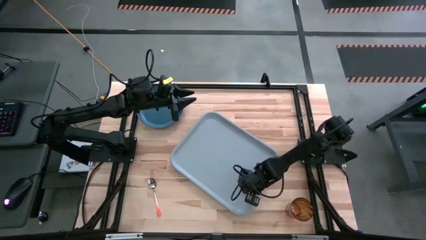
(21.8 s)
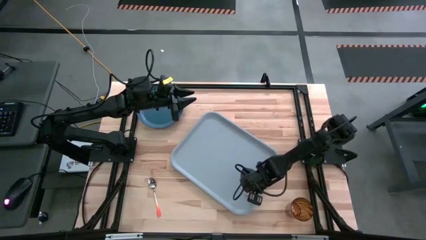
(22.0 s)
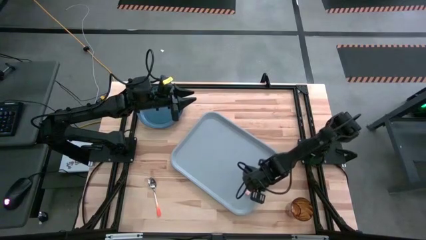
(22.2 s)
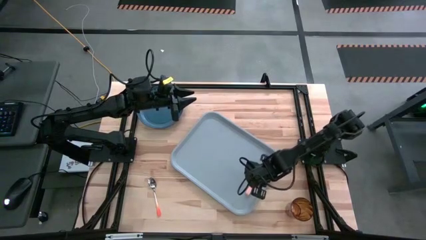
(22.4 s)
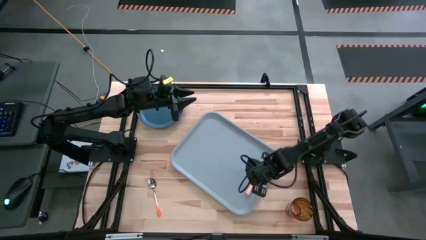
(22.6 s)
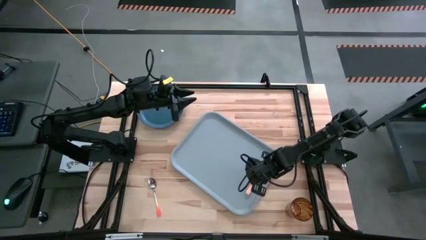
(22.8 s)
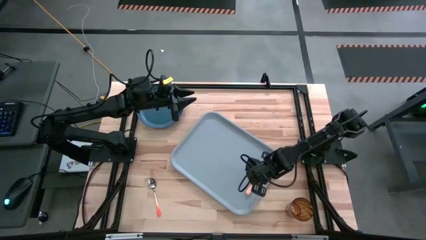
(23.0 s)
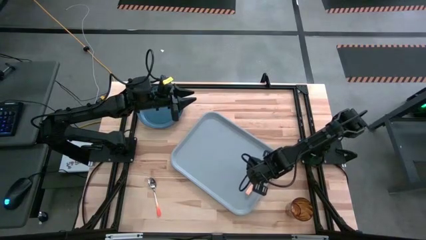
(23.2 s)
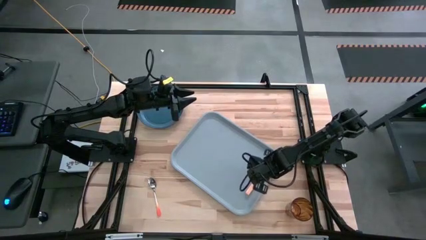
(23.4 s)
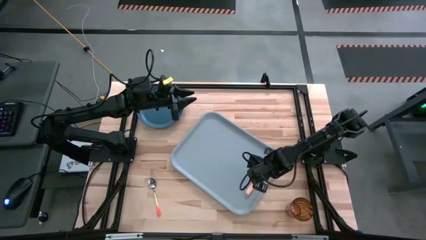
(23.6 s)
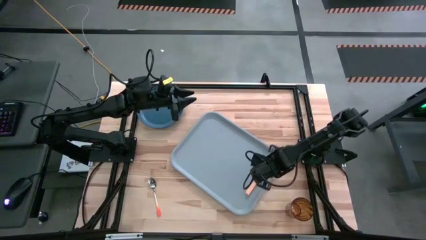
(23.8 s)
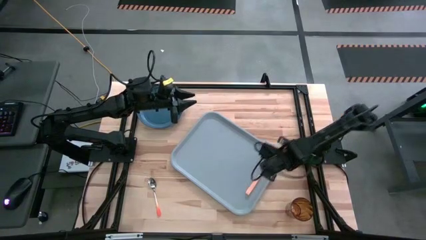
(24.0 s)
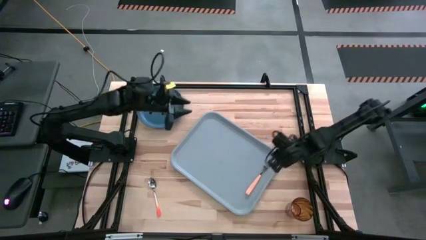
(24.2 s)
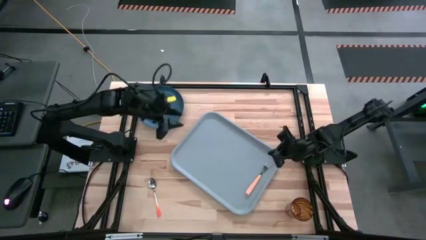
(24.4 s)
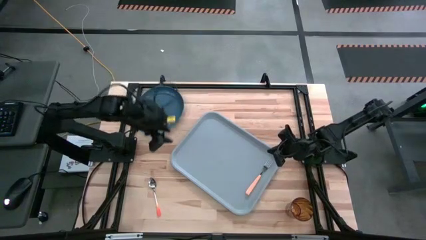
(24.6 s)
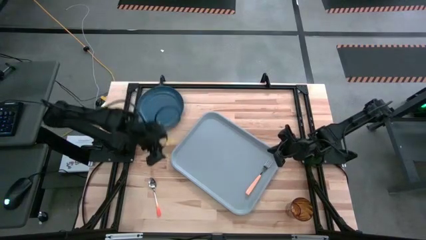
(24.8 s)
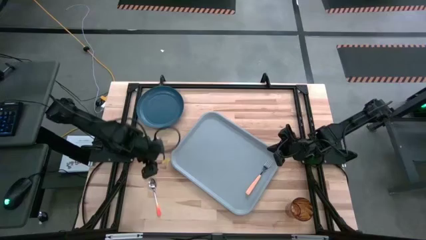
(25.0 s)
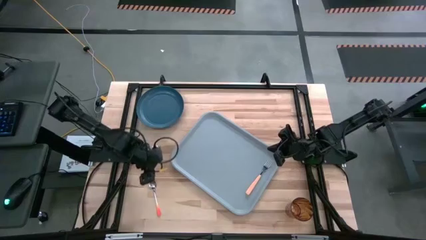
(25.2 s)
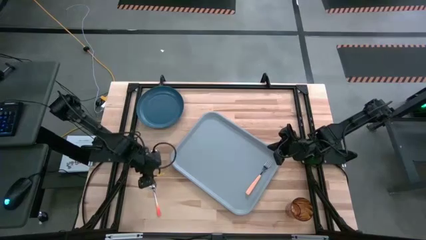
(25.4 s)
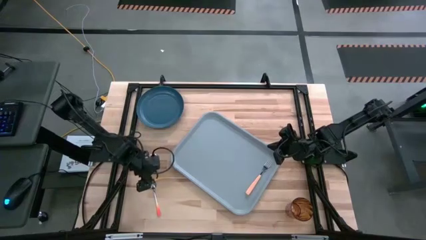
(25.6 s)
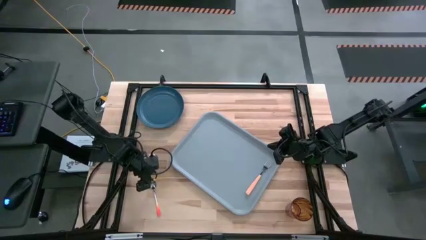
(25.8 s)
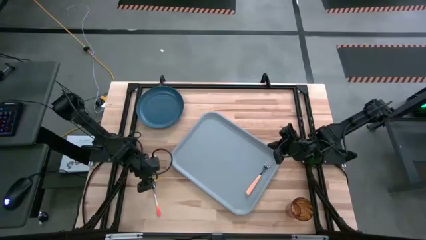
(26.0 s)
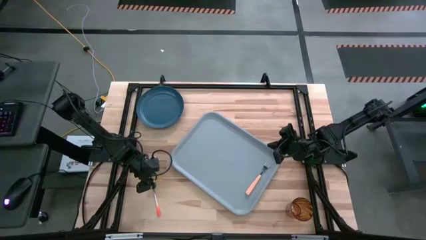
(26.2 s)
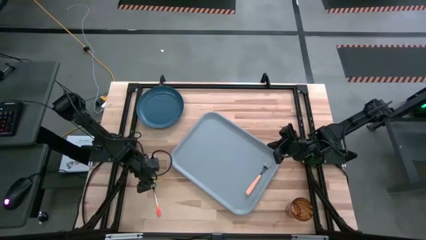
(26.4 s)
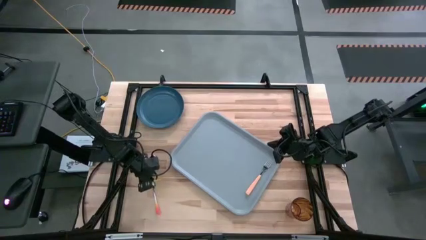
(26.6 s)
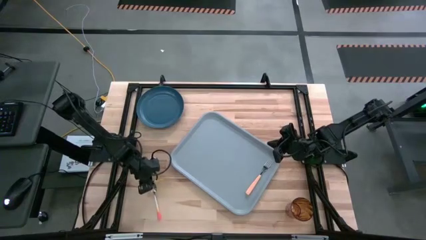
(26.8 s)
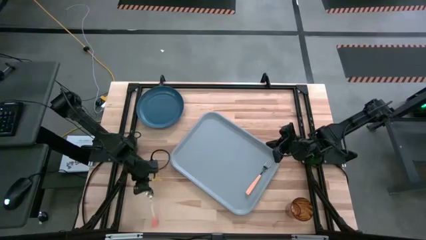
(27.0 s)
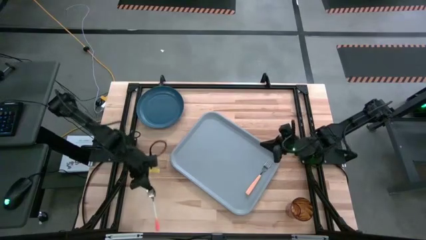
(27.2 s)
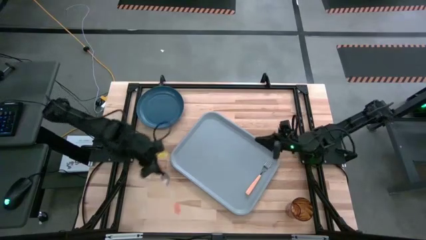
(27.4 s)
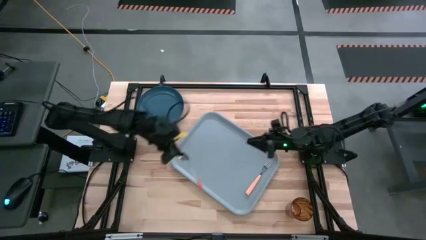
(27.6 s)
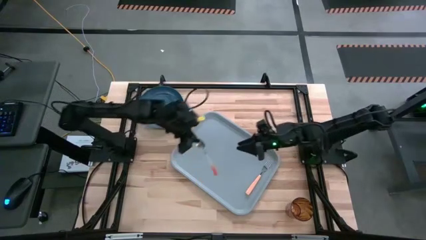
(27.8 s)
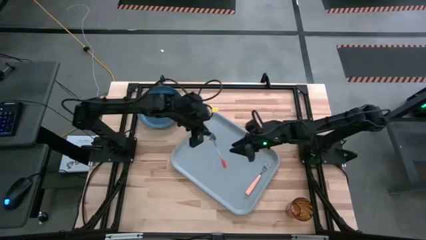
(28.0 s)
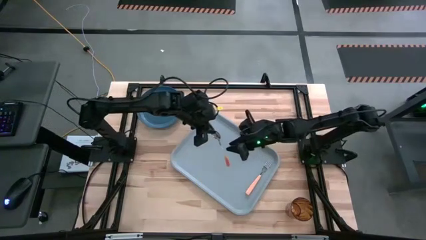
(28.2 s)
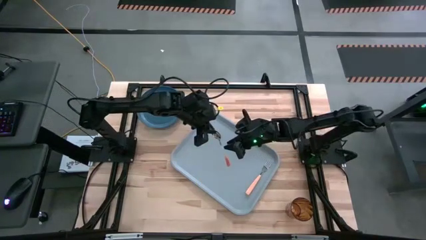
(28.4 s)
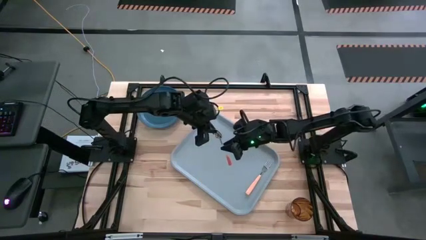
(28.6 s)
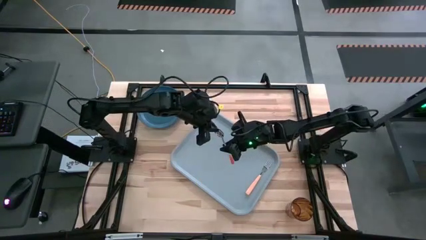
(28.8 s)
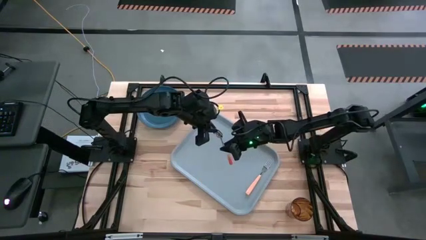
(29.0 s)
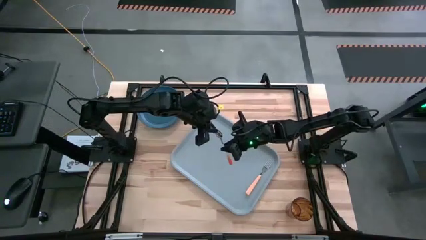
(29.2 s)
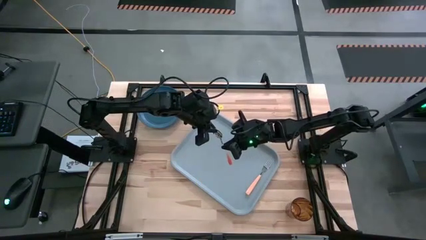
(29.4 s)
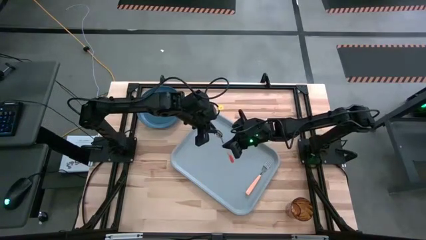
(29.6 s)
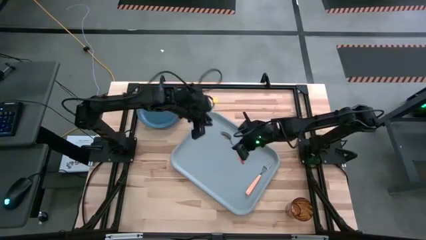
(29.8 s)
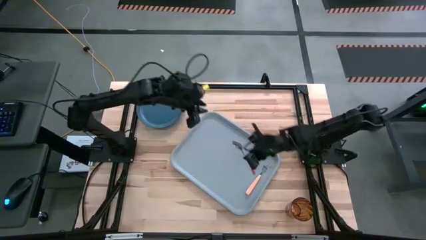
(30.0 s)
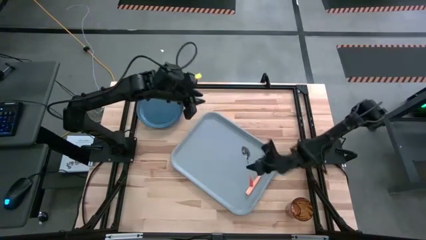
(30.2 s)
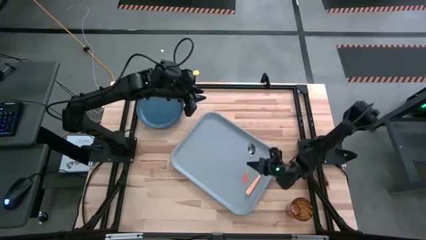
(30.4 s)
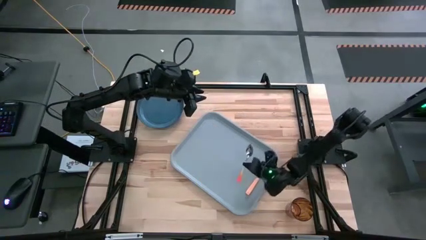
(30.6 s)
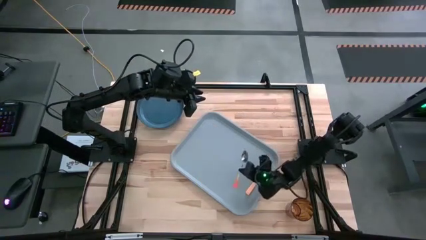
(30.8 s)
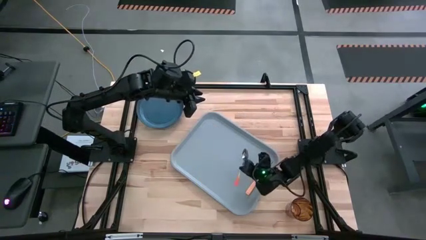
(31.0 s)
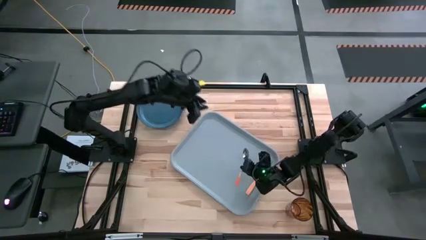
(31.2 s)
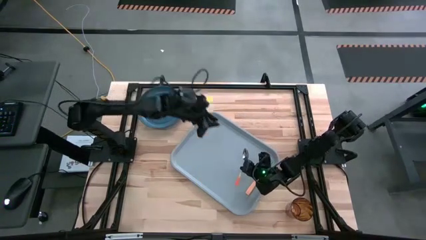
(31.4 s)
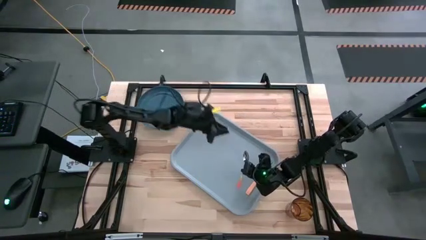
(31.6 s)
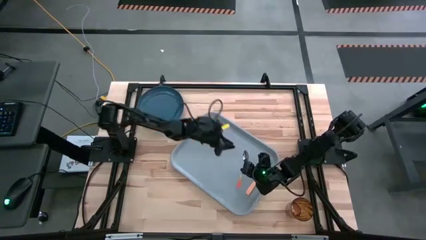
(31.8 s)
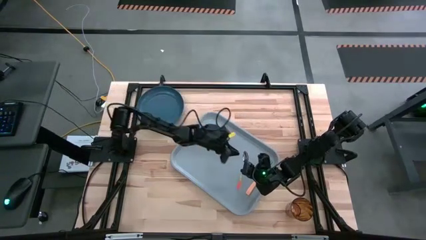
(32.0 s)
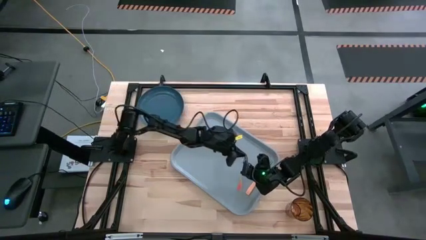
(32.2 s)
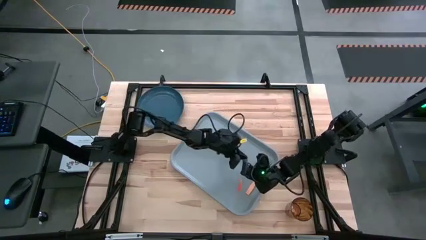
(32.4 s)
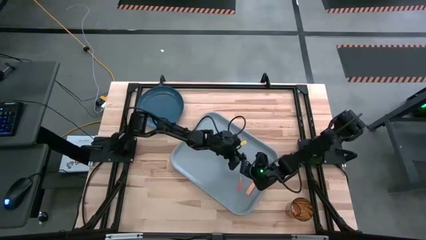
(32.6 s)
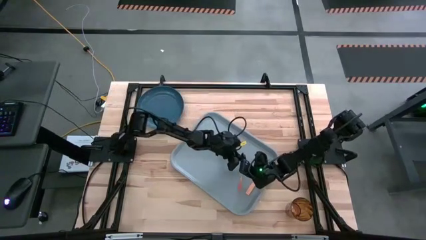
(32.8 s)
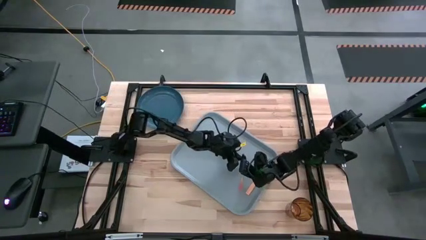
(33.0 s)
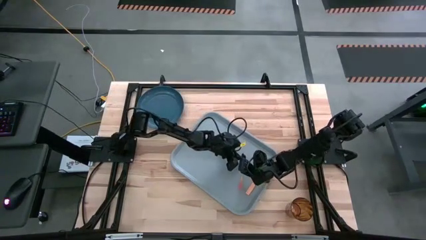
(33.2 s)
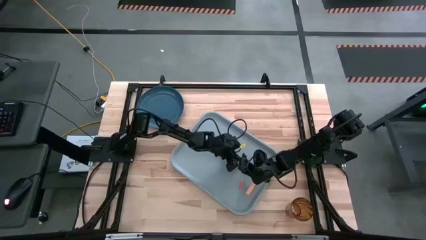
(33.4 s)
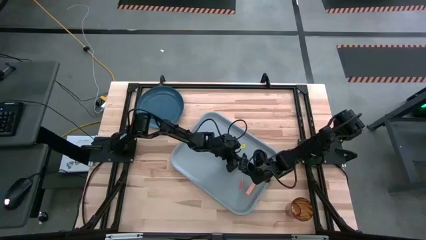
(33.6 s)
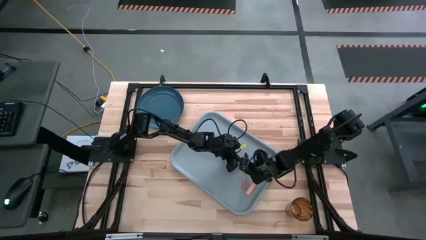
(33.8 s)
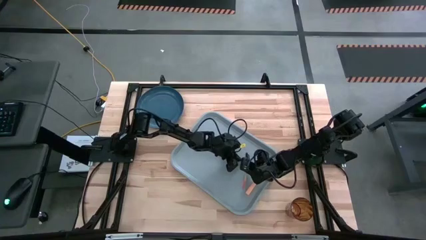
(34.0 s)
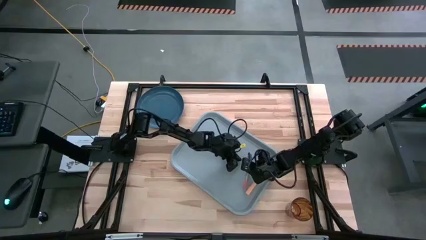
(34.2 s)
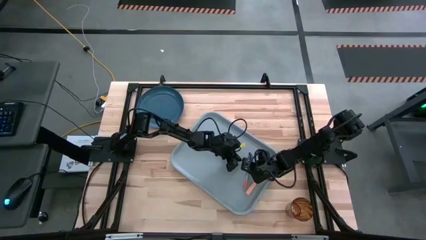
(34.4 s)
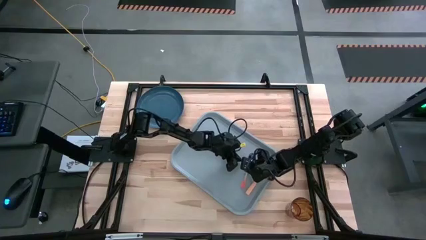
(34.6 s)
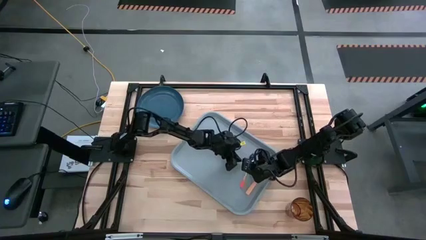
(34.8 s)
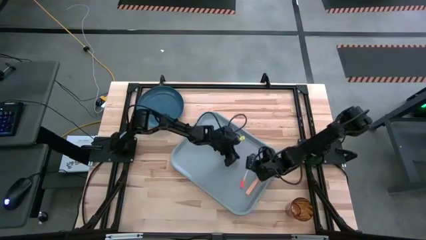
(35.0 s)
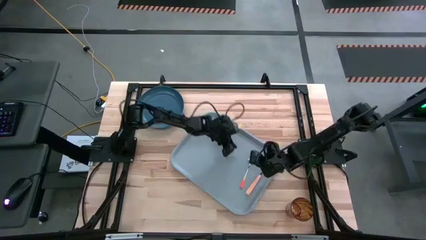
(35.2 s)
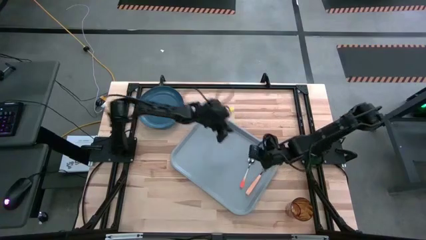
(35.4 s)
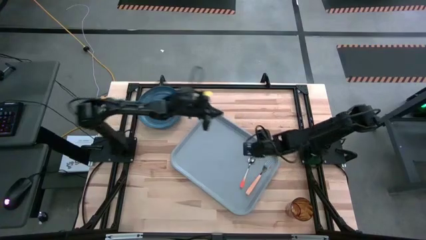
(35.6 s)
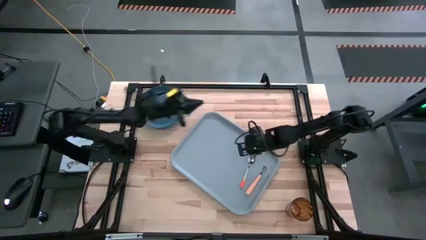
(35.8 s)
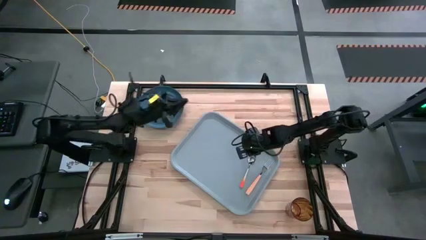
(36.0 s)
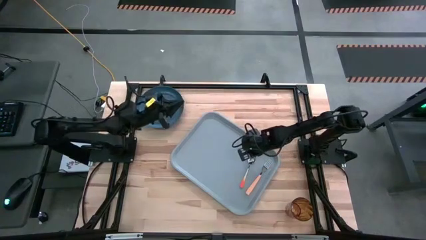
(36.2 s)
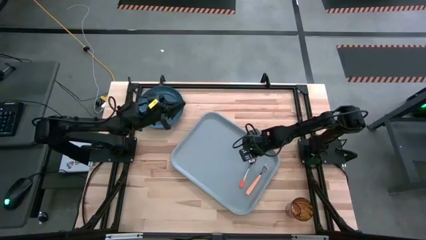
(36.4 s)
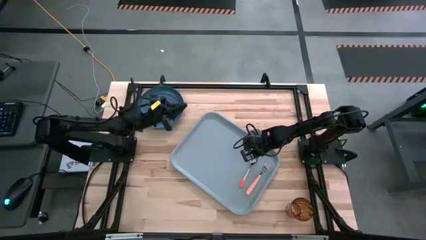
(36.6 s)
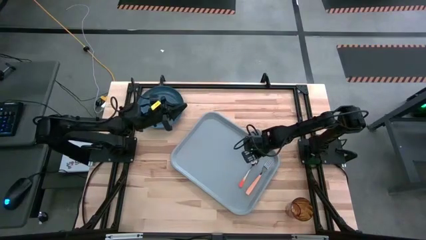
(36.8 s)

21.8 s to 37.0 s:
Task: Pick and place plate/cup/fork/spoon on tray
Put the orange spoon on the gray serving tray to the left of the light orange fork

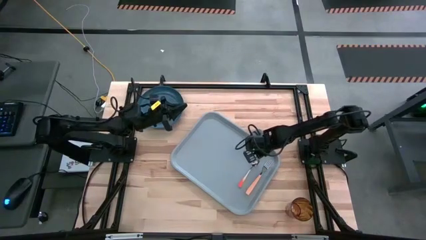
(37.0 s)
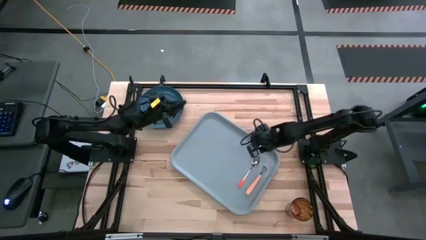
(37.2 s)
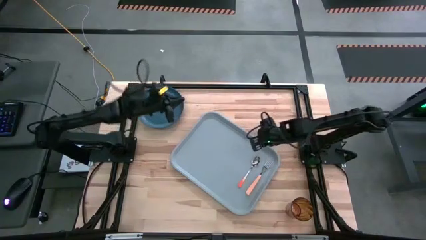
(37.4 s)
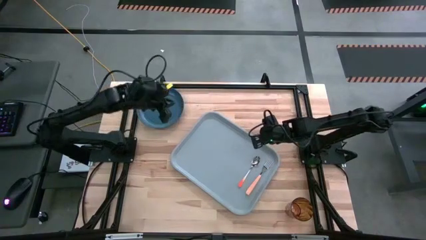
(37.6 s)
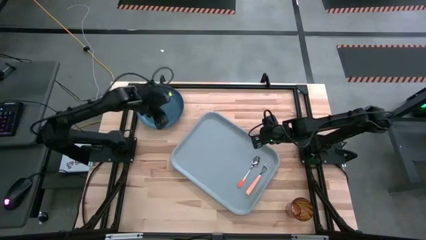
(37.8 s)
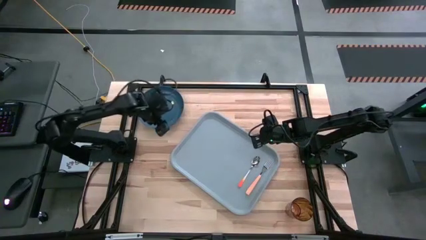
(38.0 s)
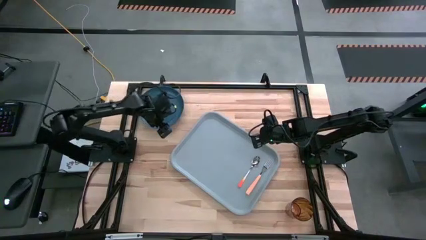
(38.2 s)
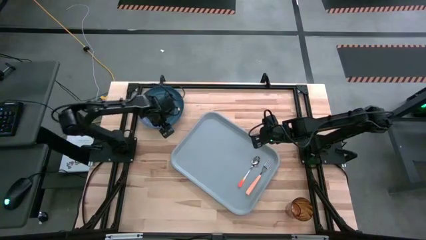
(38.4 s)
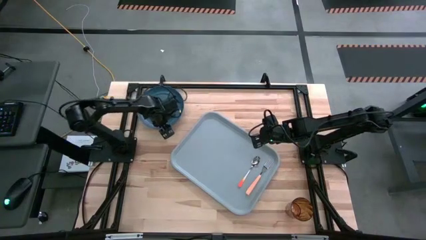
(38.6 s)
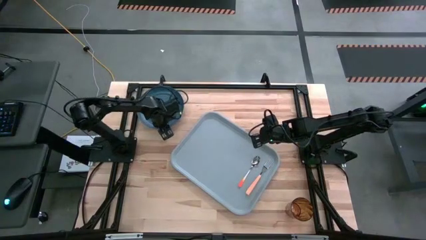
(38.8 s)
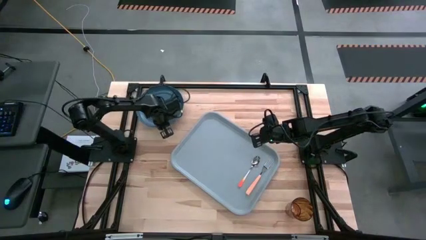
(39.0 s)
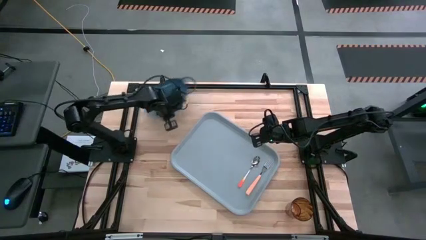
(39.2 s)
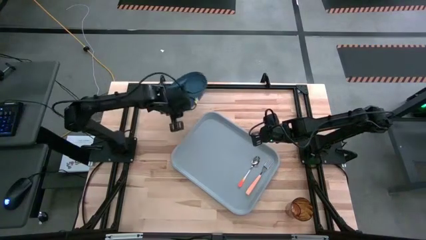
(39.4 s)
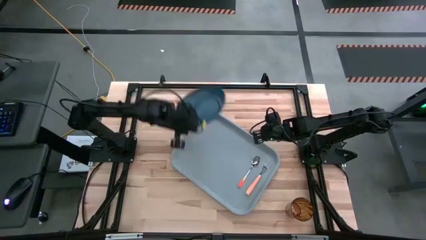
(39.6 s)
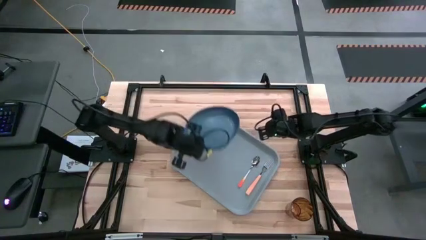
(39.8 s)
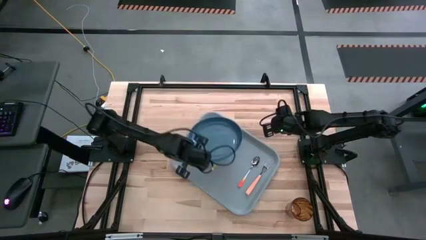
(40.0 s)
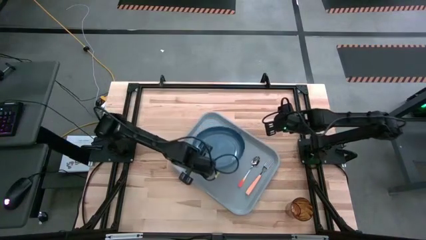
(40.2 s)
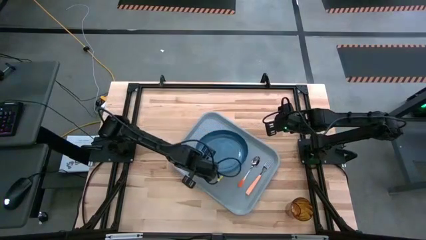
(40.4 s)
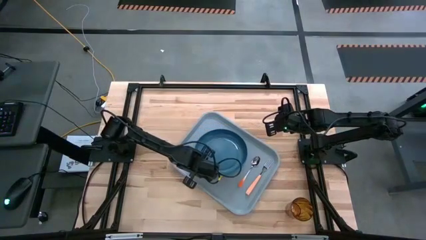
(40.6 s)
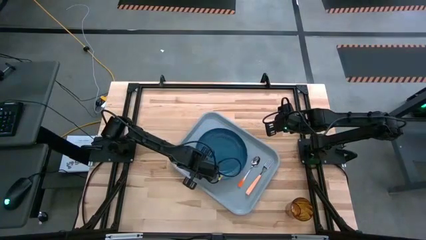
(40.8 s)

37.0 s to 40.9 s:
Put the blue plate on the gray serving tray to the left of the orange spoon
